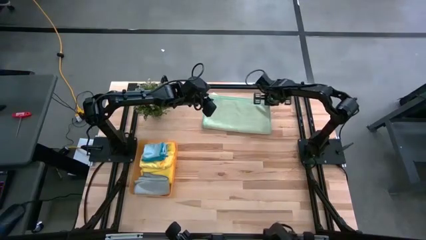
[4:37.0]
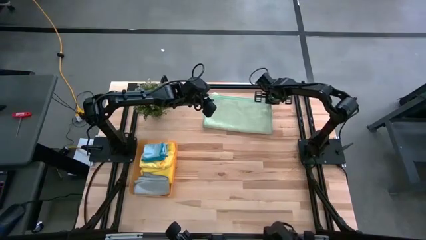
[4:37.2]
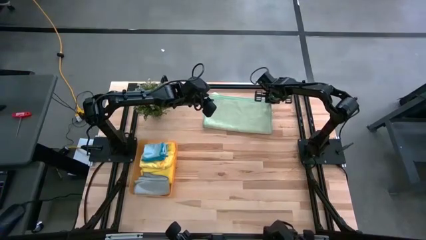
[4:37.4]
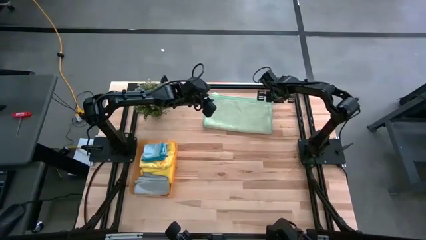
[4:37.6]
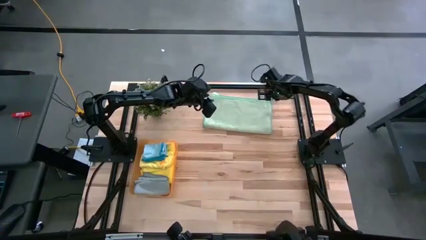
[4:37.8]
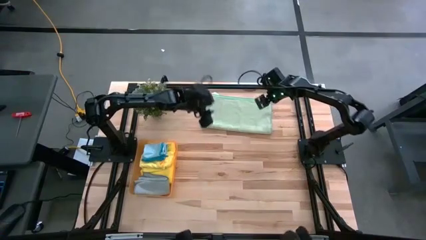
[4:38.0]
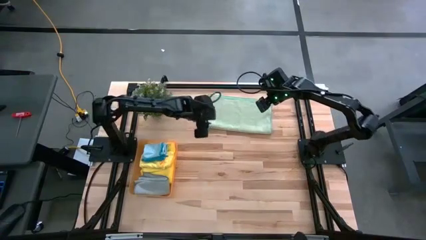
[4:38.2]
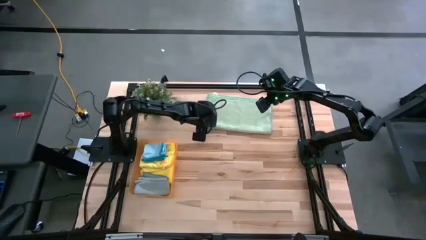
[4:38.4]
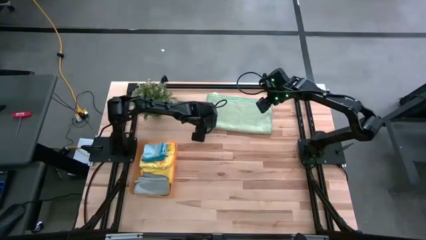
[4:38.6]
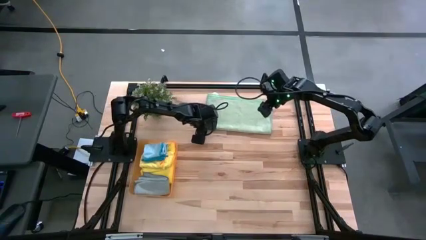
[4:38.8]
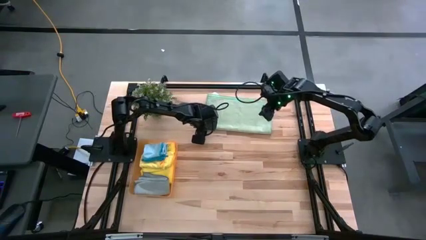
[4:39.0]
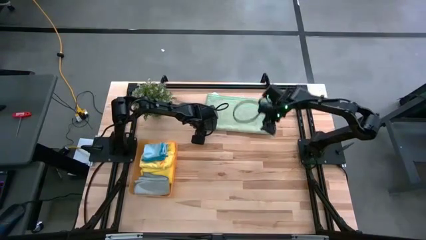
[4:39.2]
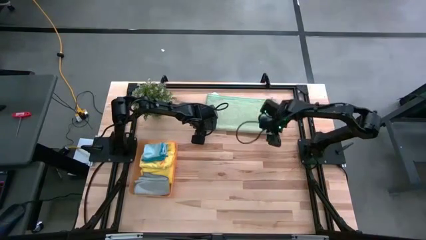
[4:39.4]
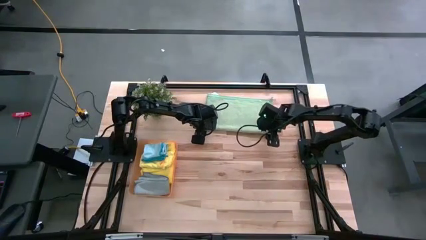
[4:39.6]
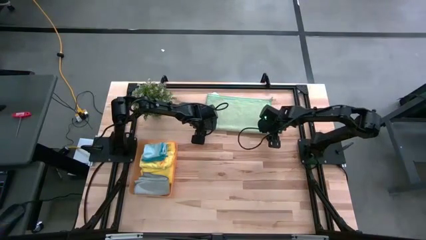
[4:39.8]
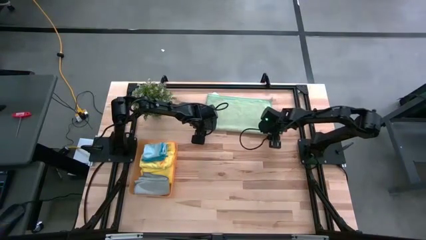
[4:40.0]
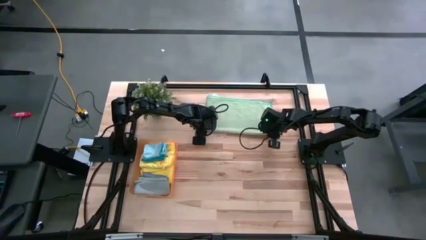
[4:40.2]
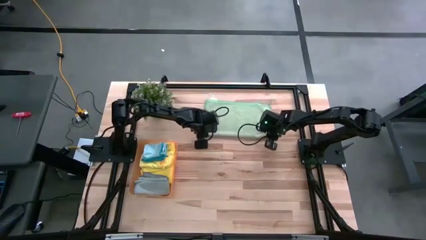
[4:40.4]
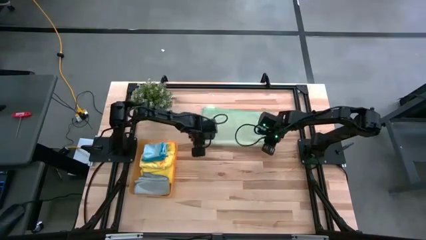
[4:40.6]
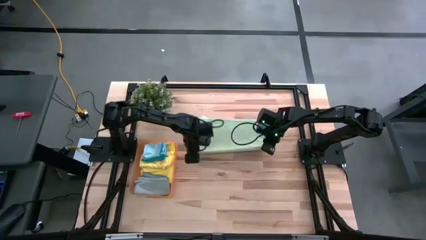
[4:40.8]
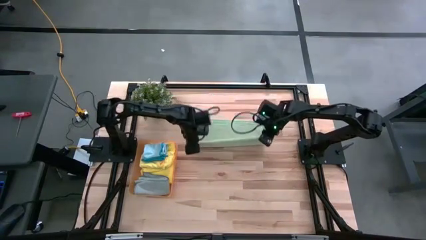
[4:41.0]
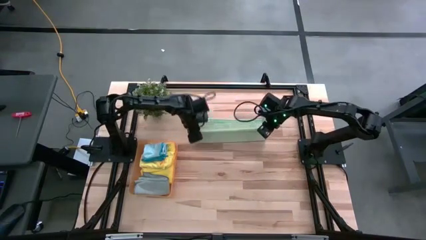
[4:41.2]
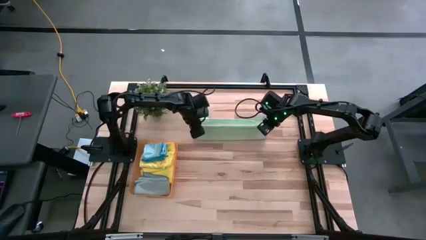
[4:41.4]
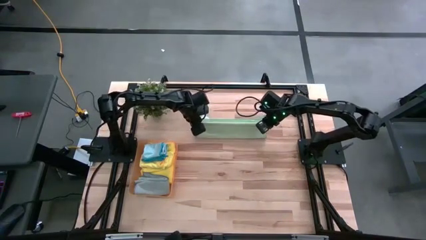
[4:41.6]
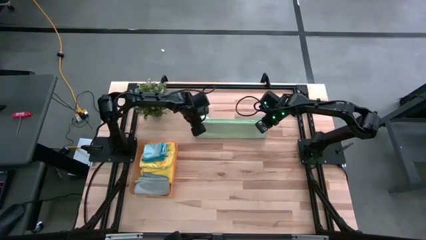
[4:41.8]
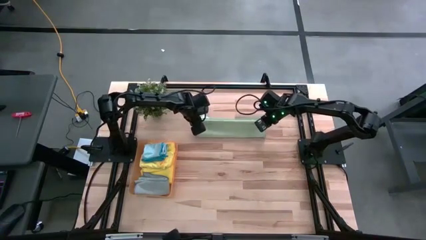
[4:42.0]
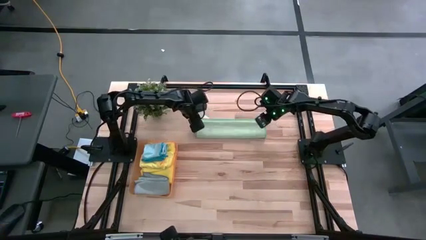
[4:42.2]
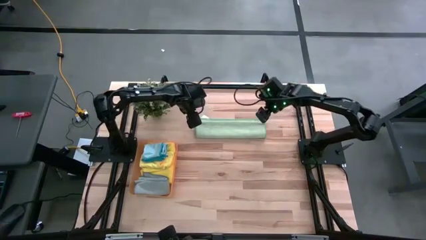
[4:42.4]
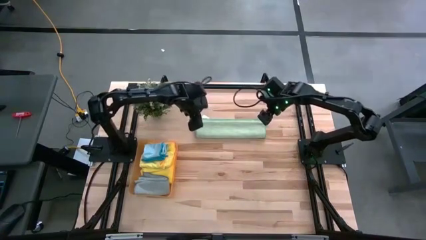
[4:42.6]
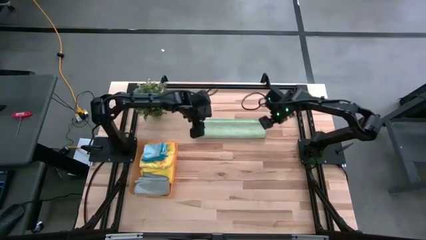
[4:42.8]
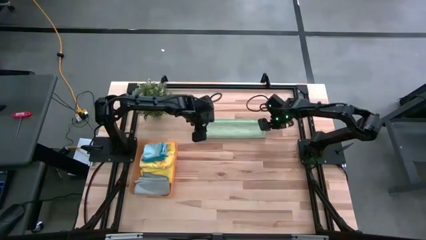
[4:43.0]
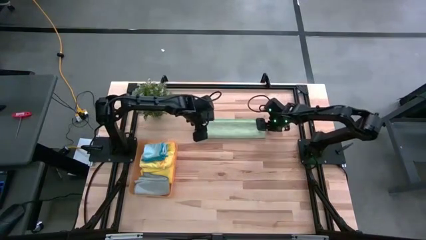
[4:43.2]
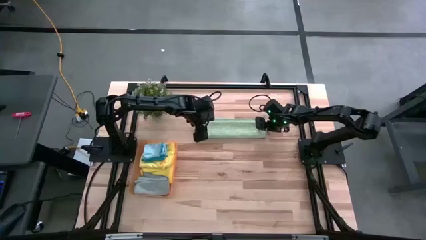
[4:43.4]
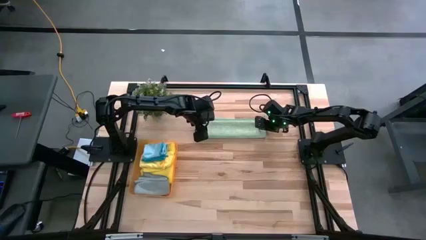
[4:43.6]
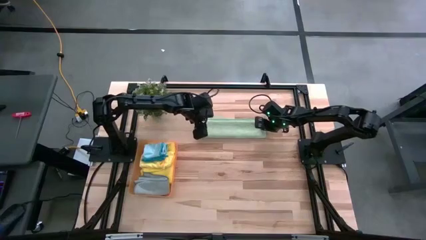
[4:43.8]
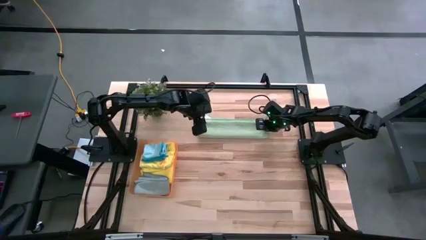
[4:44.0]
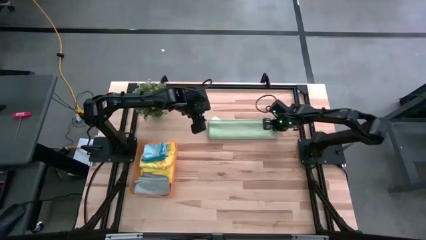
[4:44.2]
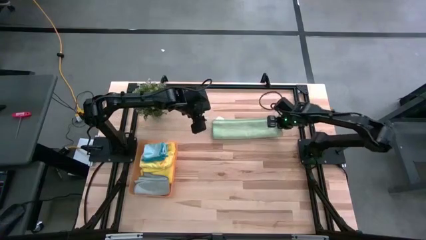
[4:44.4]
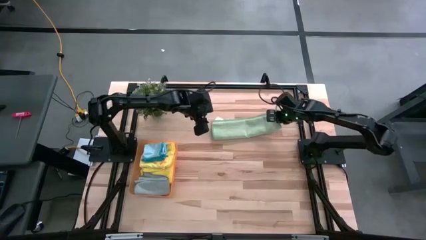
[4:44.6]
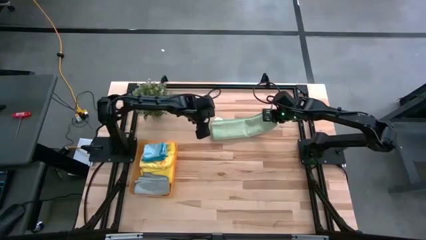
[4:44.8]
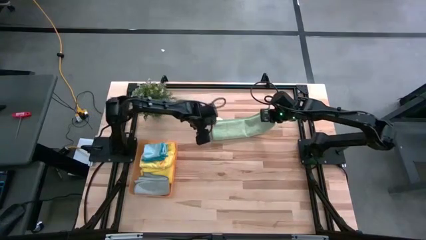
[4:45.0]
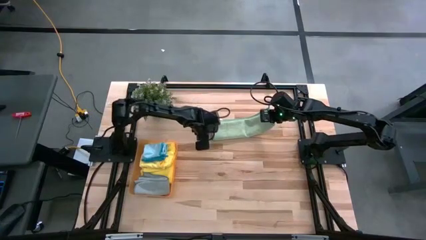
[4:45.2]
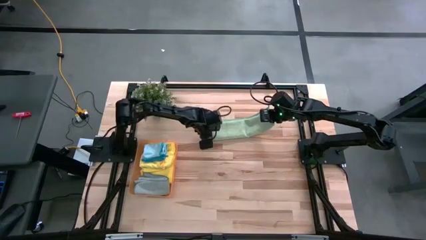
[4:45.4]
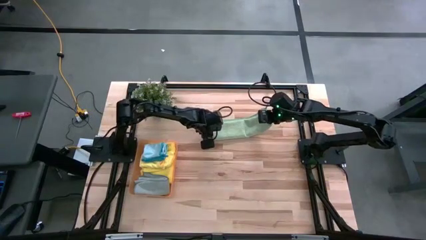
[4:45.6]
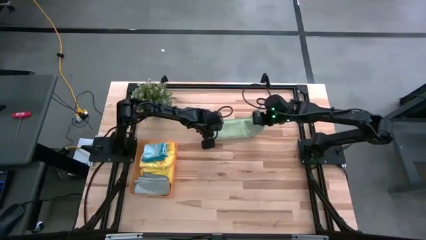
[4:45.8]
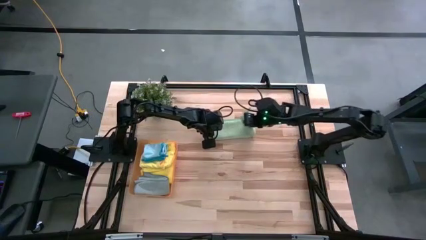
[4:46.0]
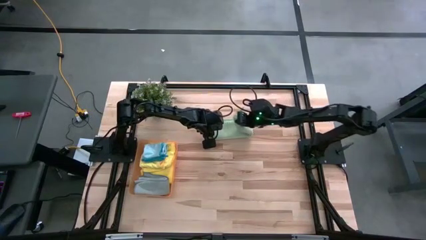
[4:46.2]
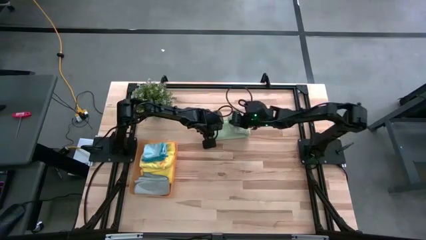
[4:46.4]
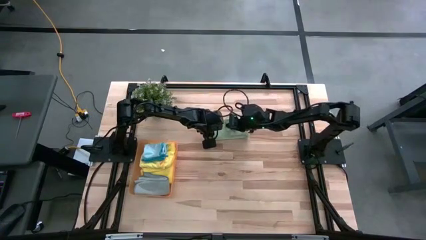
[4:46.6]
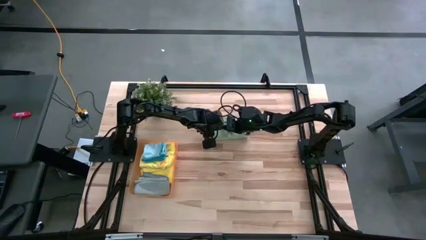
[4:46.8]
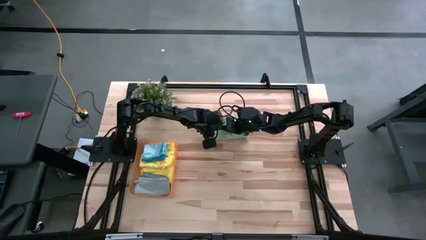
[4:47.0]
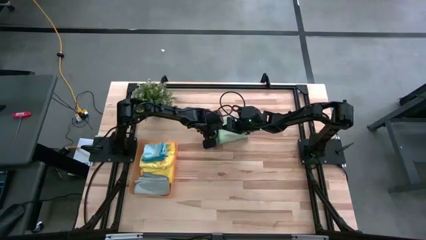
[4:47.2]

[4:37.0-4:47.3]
Task: Fold microfiber towels
Fold the green microfiber towel

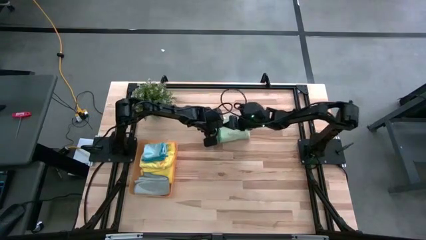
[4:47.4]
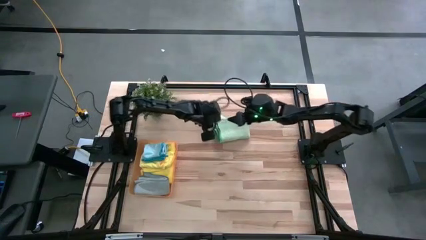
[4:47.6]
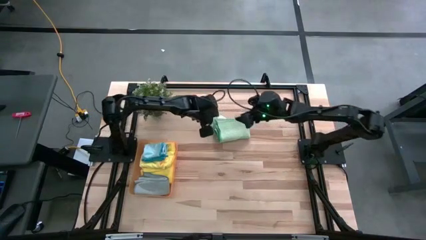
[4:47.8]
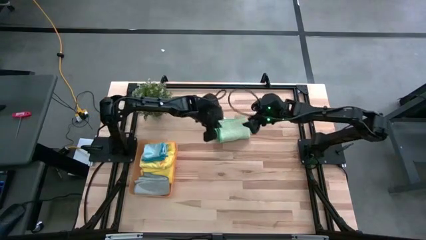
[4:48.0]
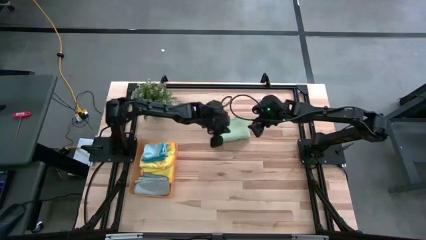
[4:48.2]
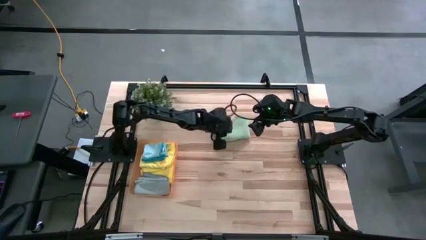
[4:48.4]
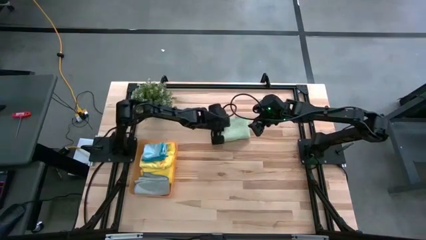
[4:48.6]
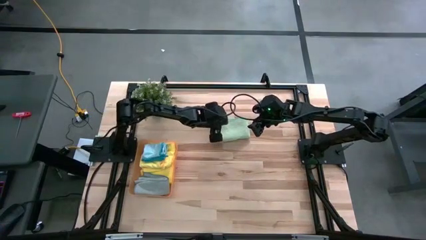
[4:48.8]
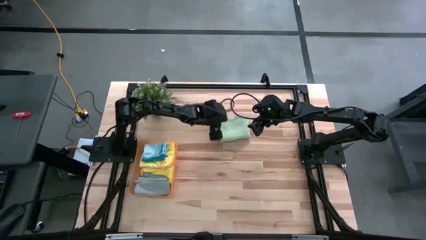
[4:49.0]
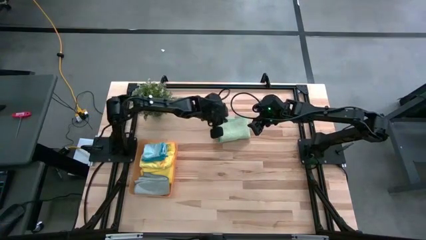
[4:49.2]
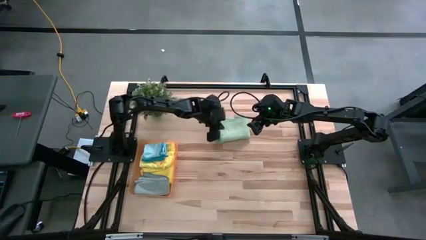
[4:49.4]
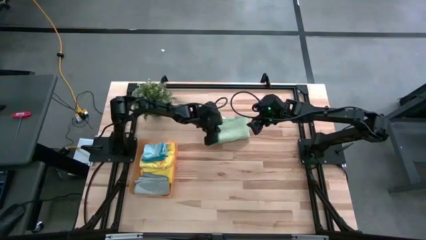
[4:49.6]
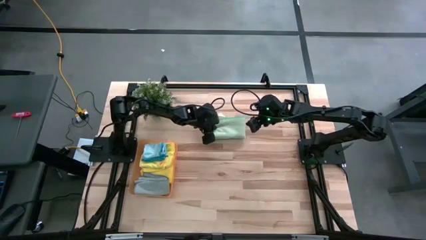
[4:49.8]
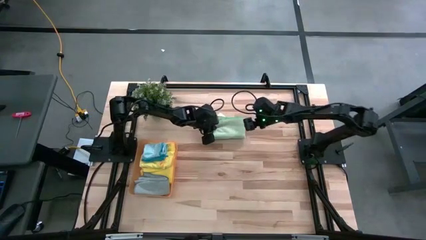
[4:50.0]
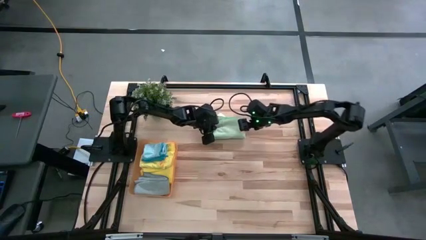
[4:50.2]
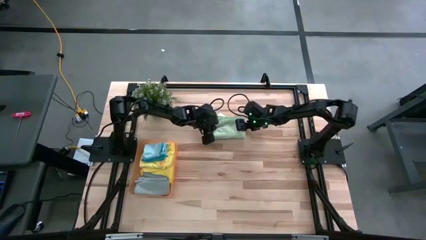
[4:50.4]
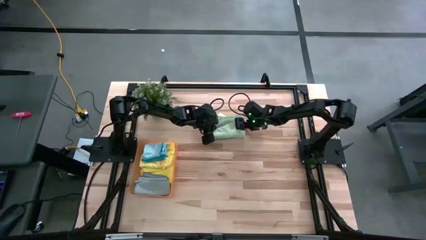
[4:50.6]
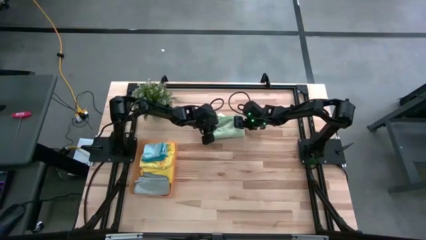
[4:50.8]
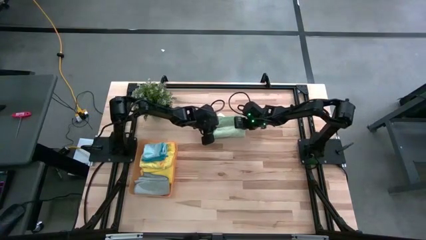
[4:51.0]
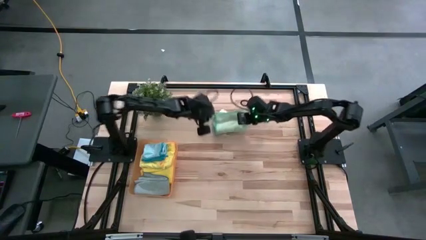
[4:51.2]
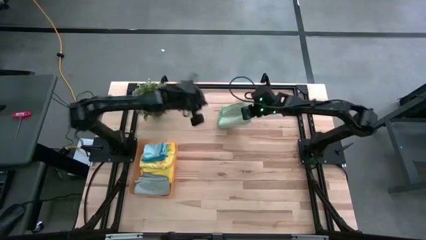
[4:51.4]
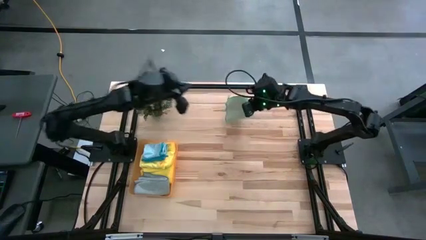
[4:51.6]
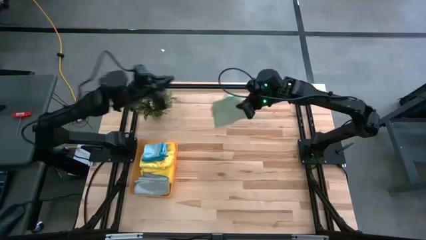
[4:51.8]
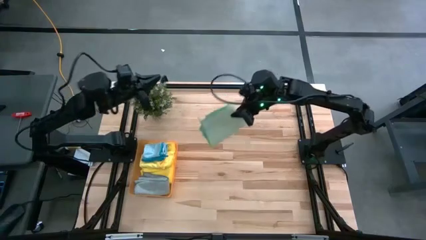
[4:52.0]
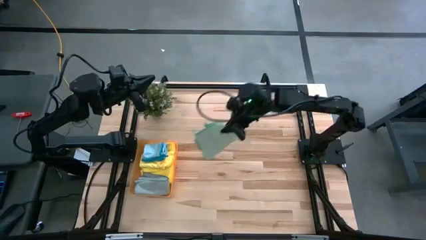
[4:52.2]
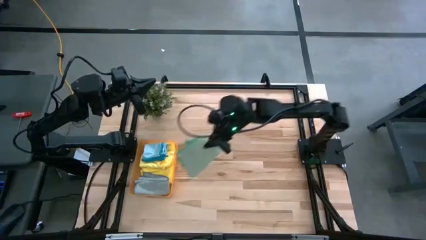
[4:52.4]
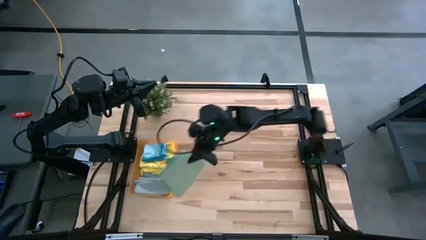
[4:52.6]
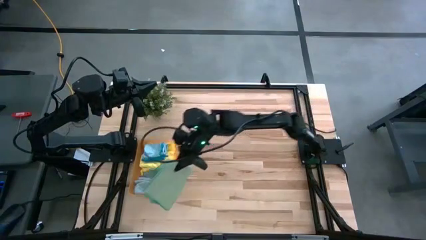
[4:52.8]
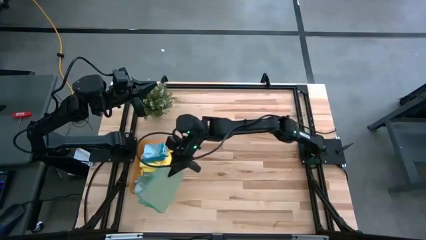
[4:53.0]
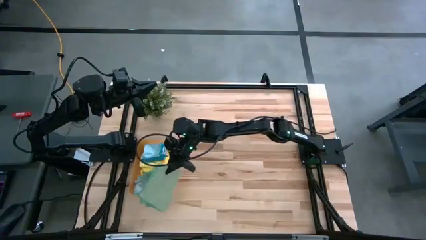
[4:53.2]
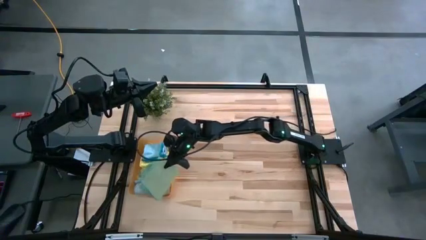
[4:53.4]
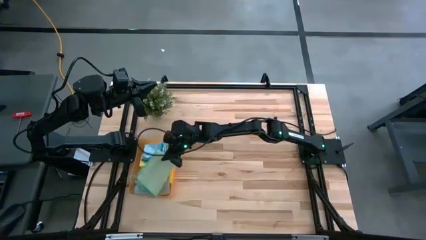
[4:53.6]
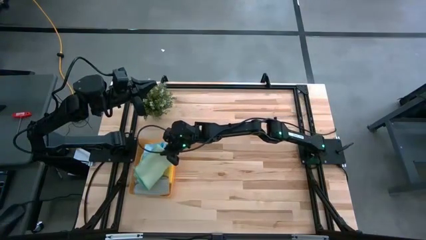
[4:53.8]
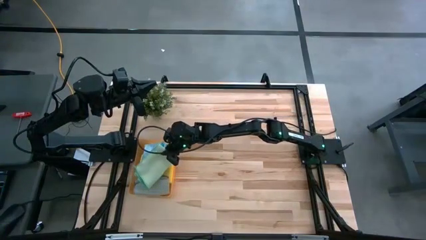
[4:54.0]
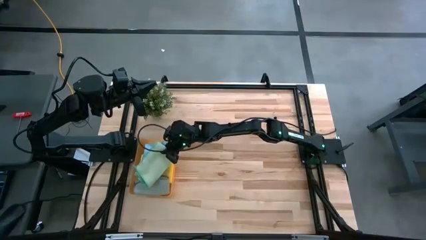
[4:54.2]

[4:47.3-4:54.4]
Put the green folded microfiber towel into the orange bin
